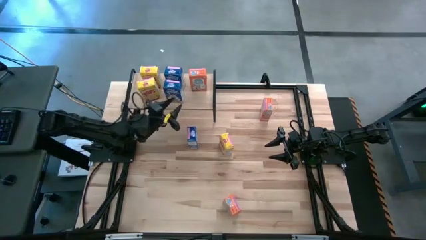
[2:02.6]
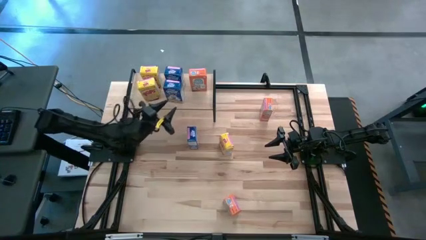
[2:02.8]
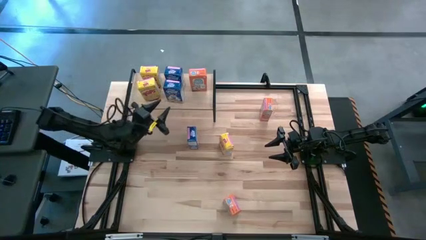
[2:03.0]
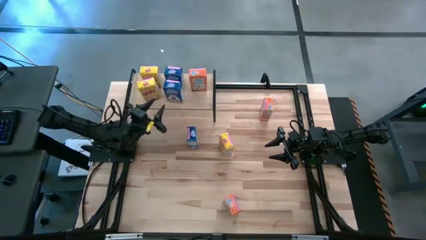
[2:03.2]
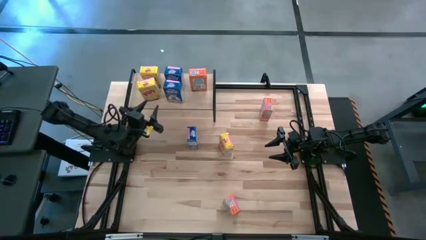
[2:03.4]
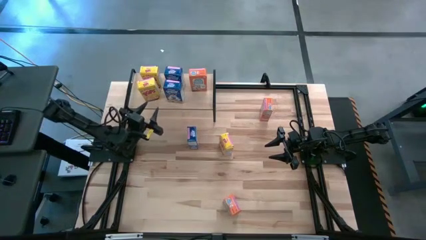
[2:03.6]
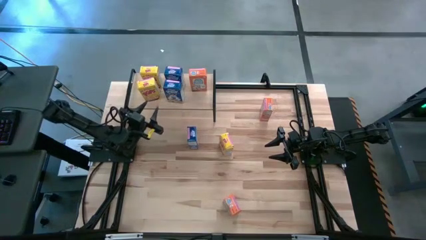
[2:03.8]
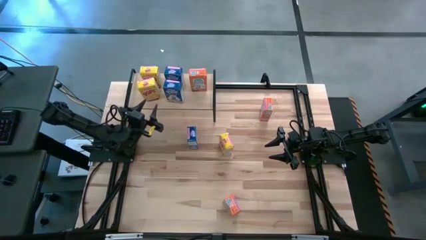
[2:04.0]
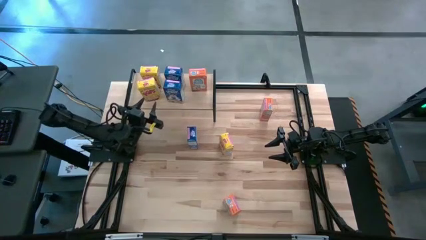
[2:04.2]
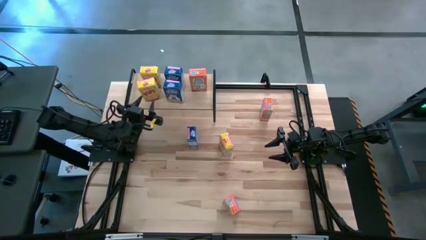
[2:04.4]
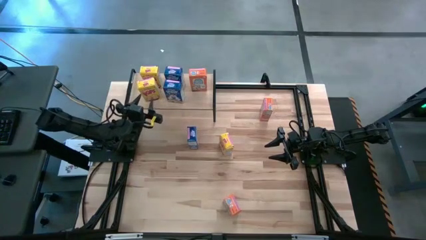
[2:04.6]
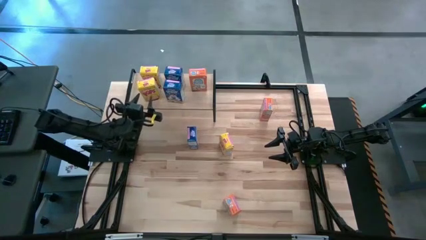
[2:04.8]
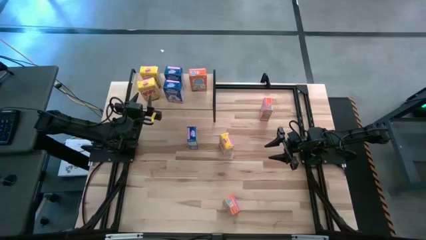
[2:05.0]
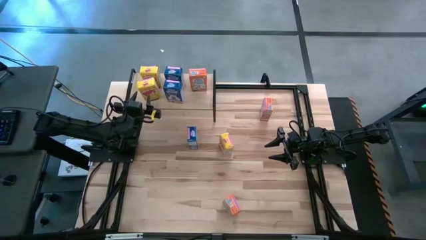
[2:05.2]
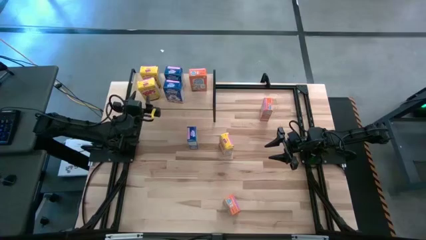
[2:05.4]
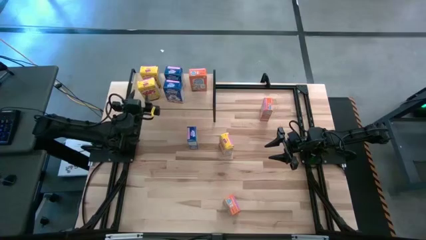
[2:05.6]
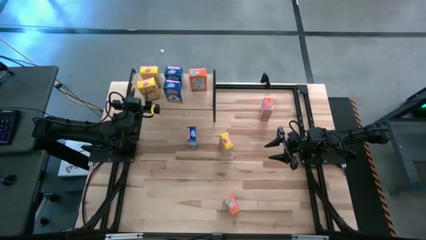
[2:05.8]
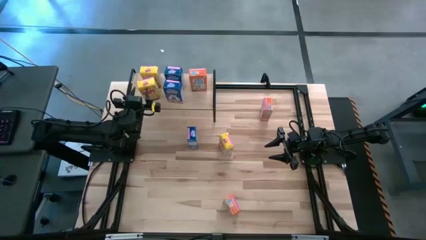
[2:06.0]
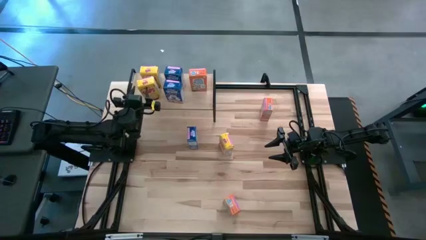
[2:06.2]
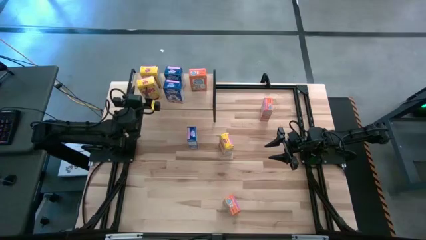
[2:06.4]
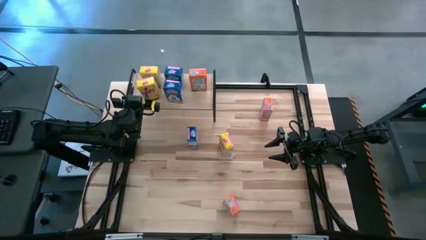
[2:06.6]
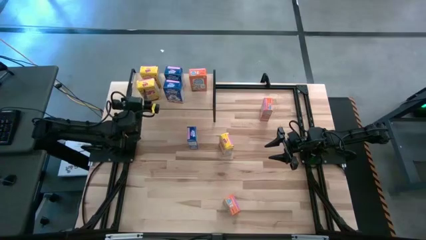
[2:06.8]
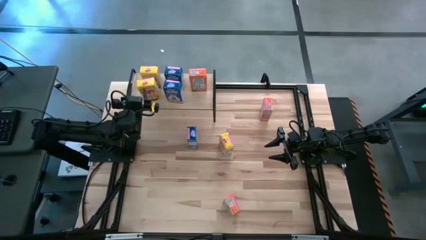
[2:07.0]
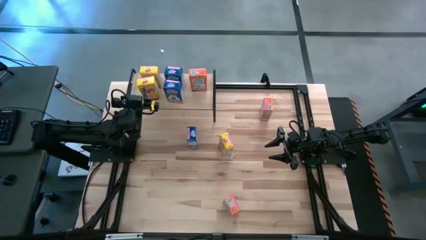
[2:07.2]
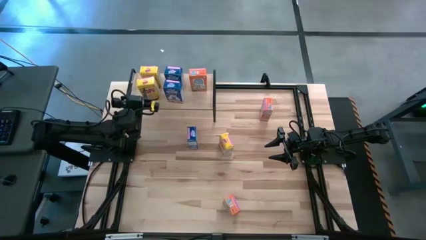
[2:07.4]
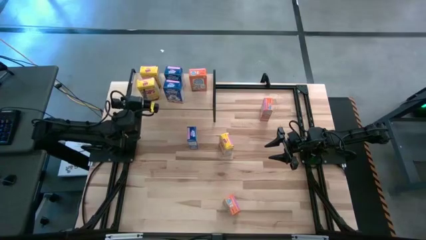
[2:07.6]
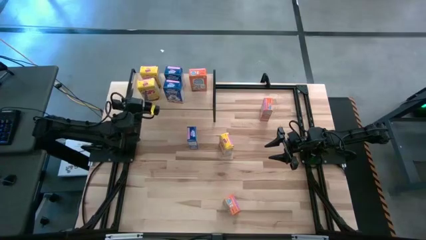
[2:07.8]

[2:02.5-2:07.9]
Task: Stack cereal on shelf
Adjust the bottom yellow cereal box on the shelf

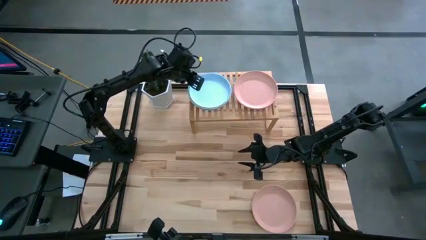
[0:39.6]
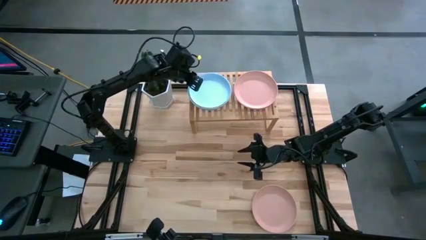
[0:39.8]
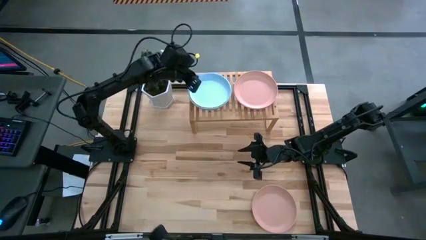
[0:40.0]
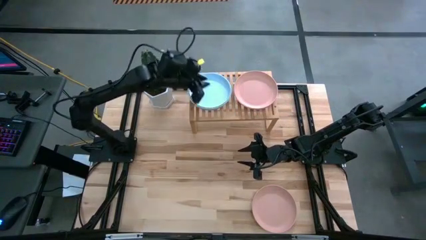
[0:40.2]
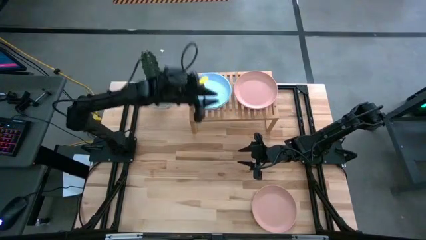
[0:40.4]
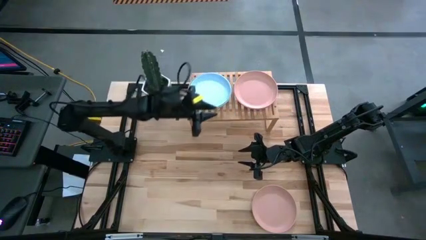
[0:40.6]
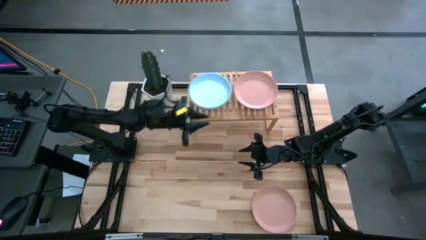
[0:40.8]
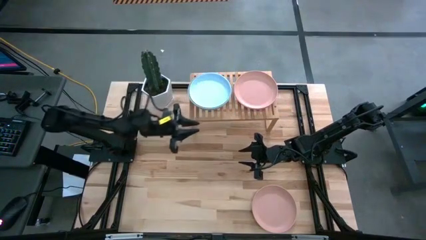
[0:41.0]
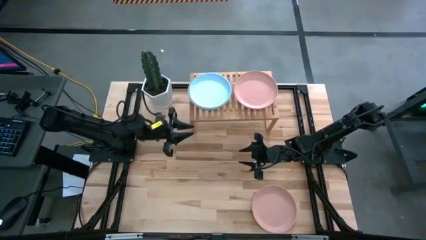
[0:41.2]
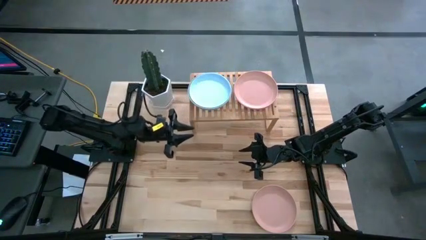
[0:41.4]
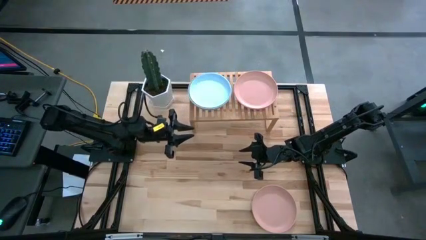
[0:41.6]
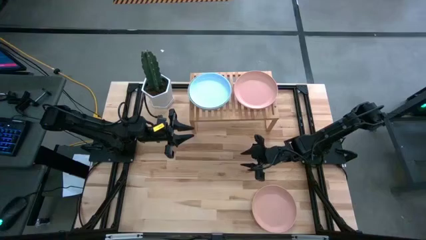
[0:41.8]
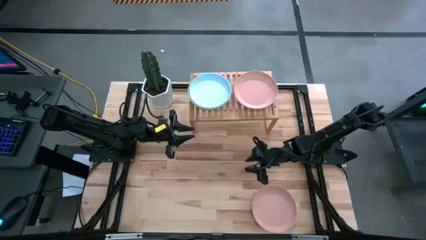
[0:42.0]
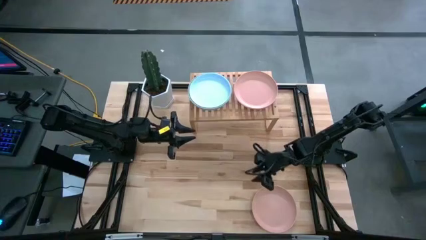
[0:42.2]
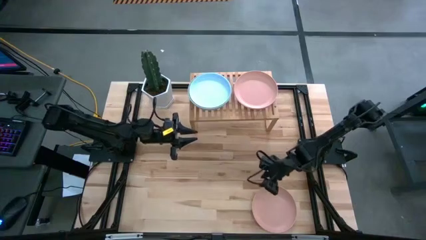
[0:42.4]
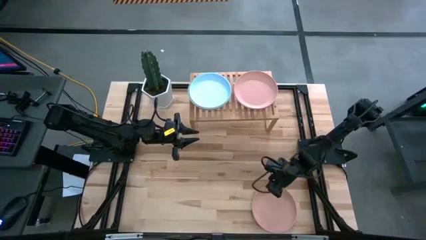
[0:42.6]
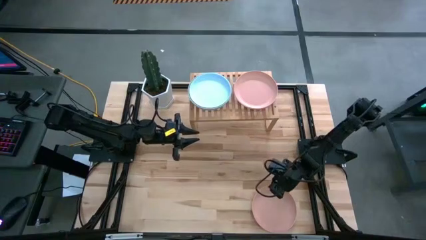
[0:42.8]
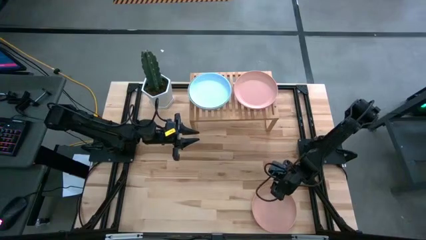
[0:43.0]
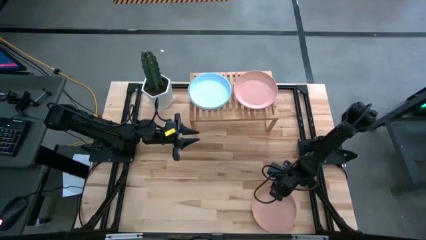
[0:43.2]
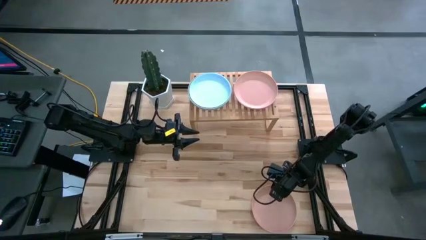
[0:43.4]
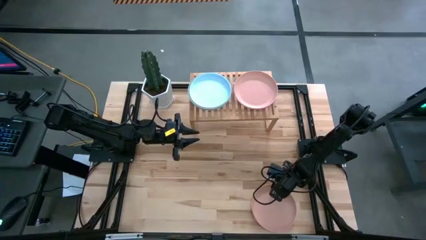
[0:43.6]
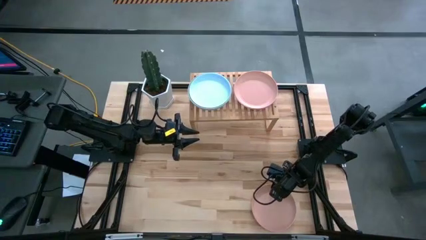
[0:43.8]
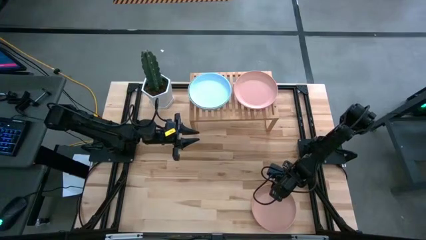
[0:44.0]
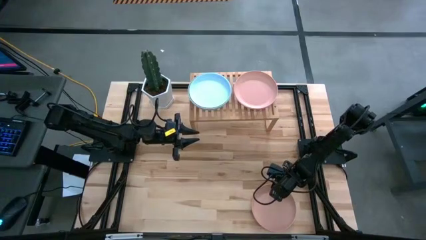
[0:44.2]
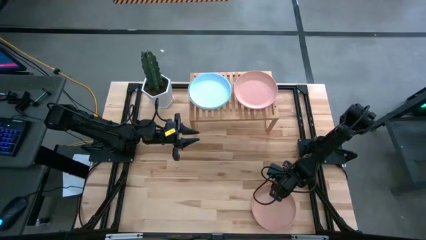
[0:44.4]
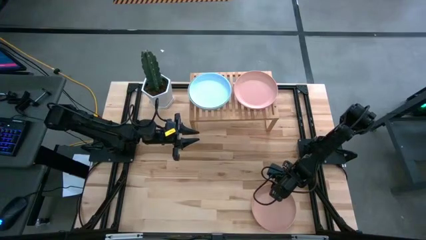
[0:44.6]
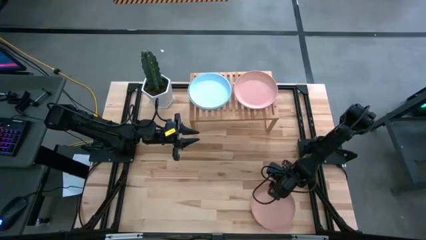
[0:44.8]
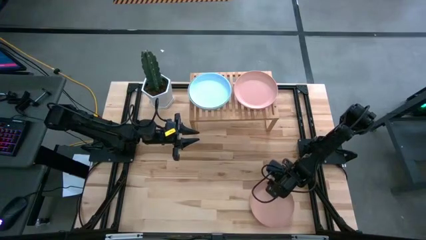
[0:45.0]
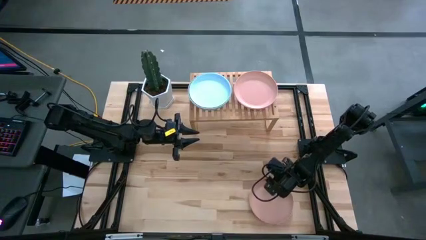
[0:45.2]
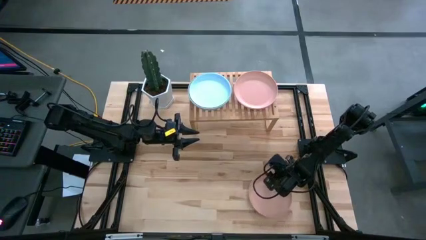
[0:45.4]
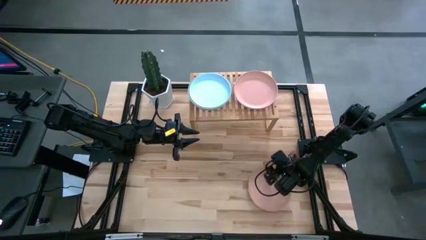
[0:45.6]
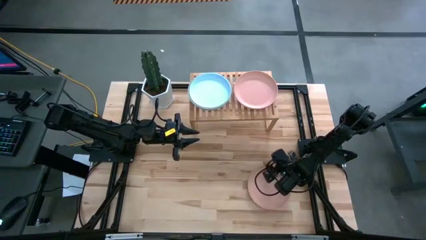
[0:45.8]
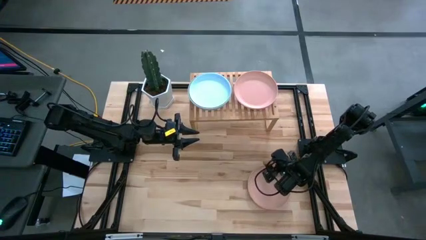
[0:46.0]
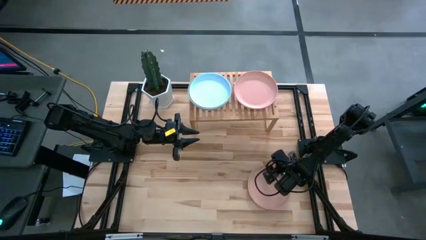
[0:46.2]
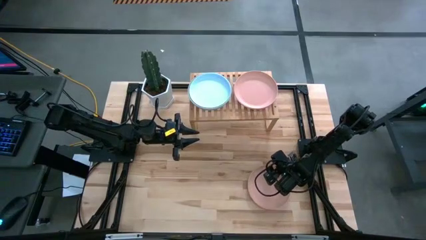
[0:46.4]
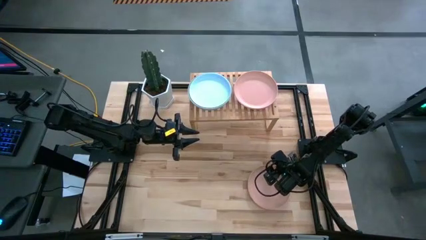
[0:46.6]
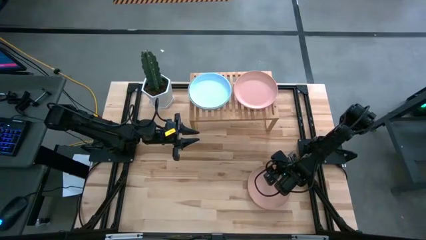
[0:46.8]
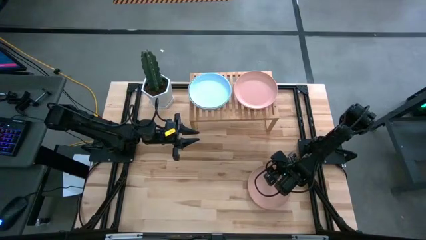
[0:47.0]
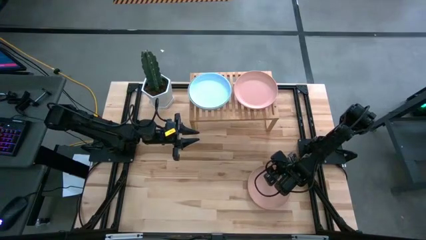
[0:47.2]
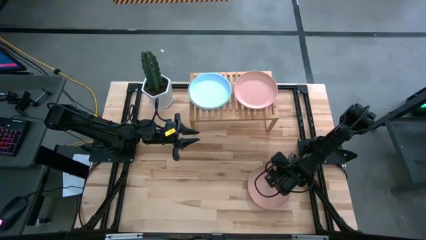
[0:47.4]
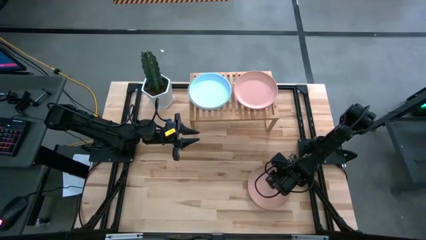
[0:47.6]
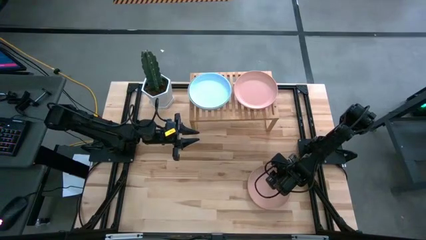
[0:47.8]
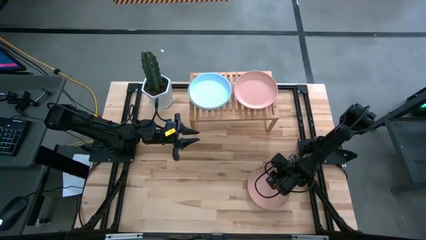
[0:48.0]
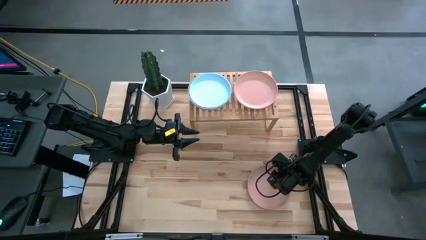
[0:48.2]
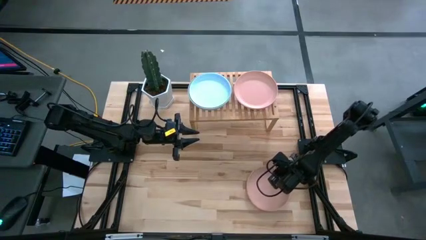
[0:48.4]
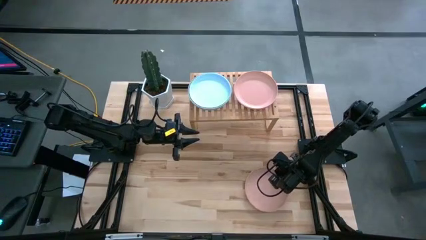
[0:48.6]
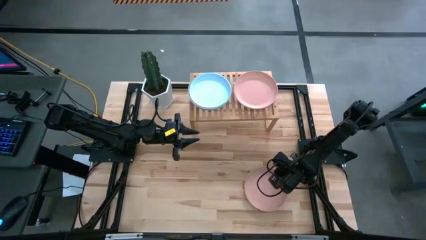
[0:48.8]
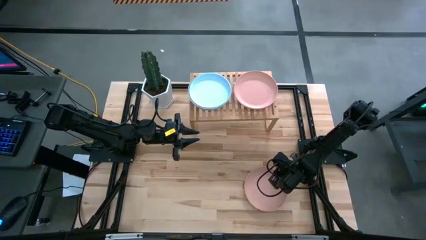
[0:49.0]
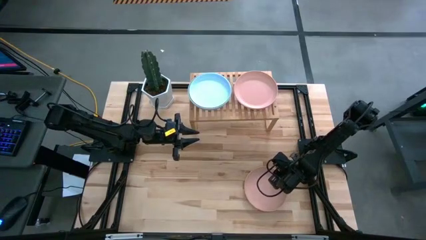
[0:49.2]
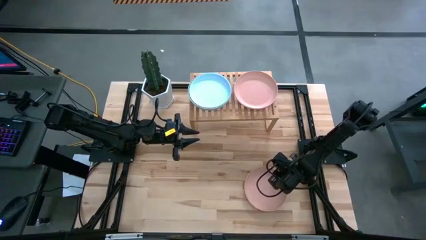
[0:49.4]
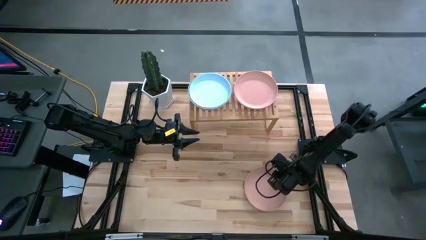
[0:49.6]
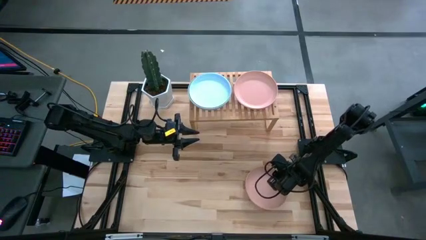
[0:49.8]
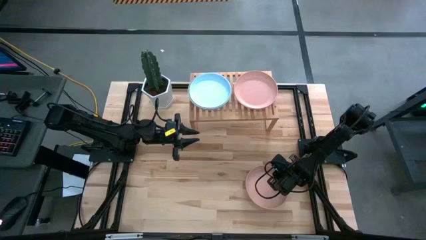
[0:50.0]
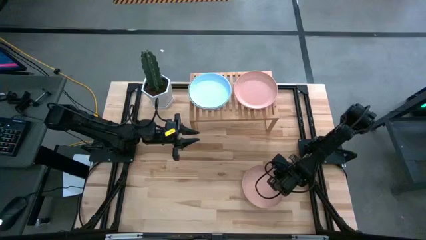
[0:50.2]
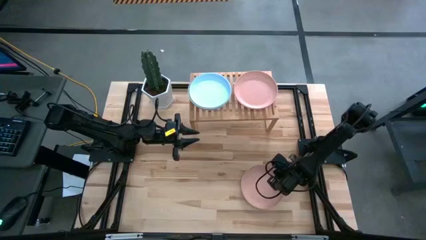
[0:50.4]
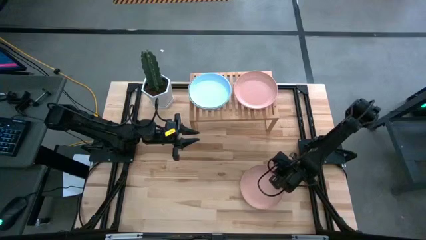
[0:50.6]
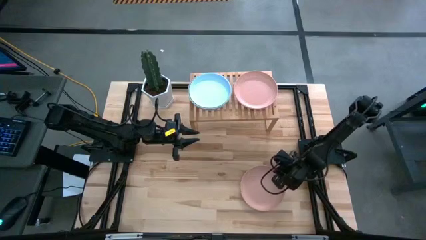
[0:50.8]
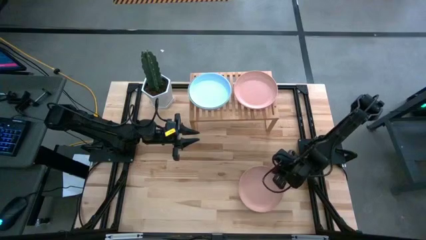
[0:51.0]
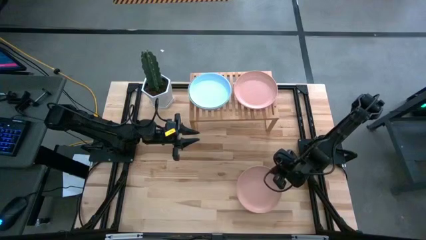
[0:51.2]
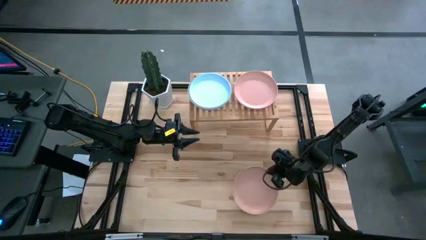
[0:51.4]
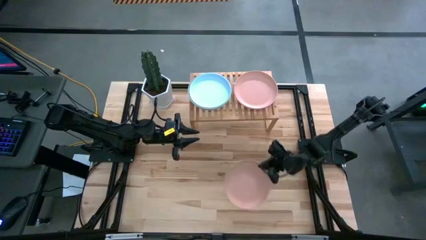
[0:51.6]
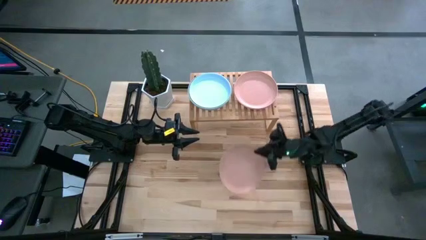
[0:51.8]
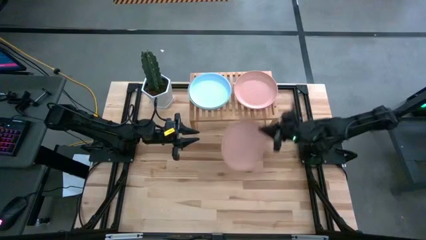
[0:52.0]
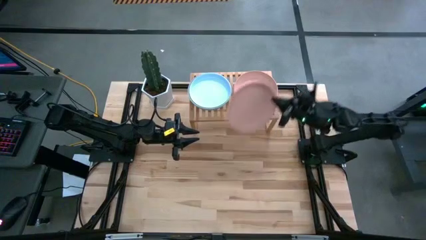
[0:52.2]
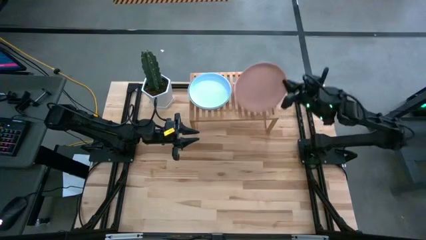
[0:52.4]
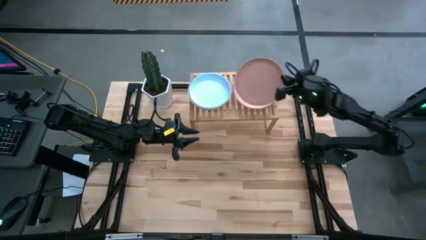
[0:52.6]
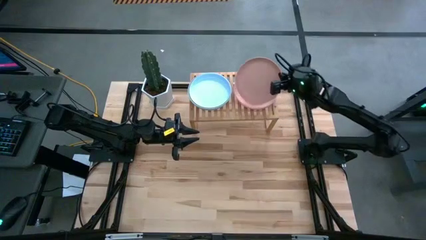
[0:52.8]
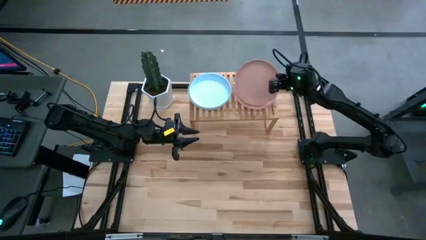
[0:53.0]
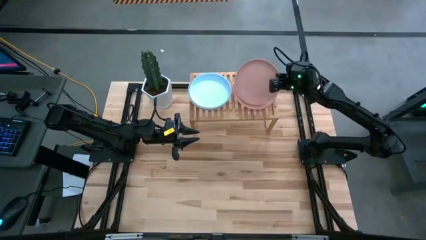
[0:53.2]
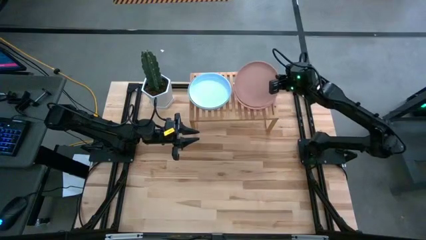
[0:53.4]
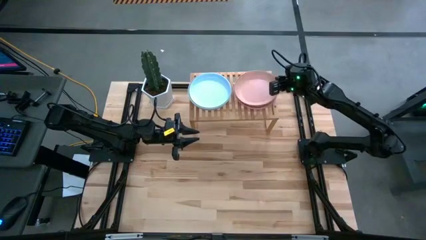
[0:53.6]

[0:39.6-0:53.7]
Task: Place and stack plates onto a shelf
Stack the light red plate on top of the light red plate on the shelf
